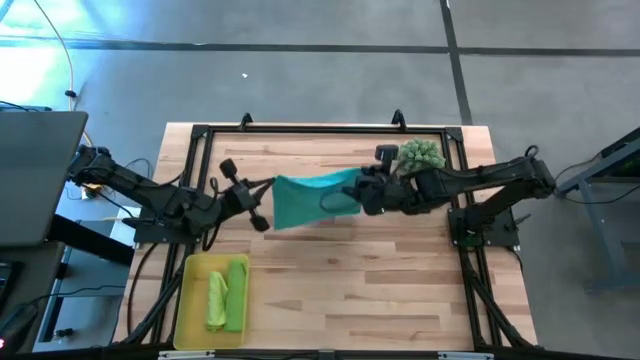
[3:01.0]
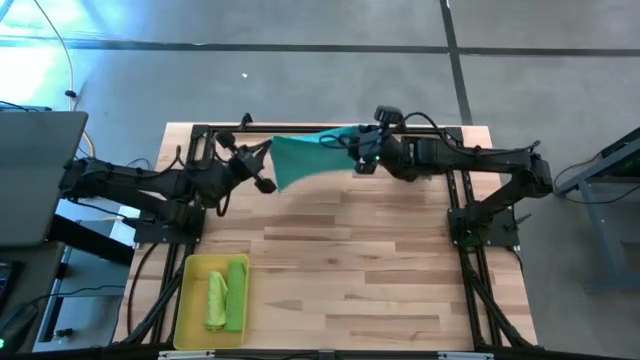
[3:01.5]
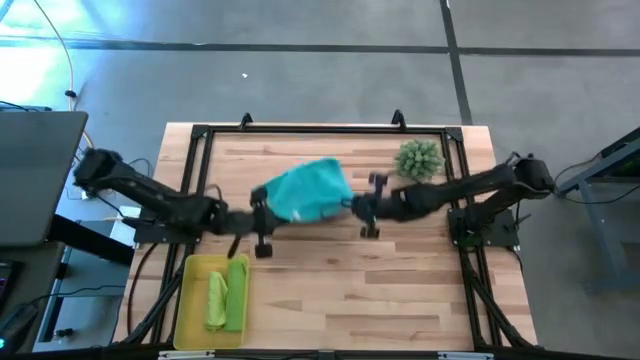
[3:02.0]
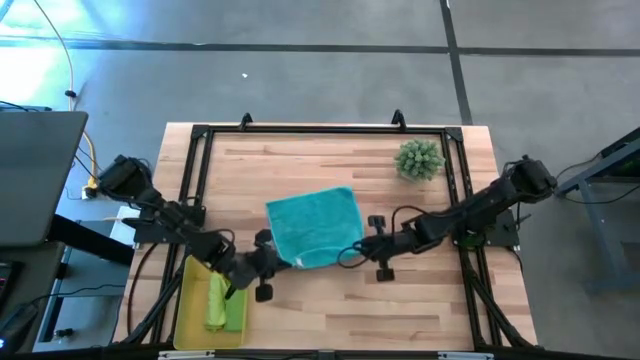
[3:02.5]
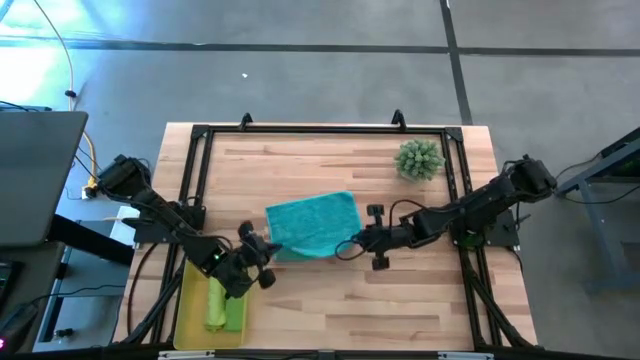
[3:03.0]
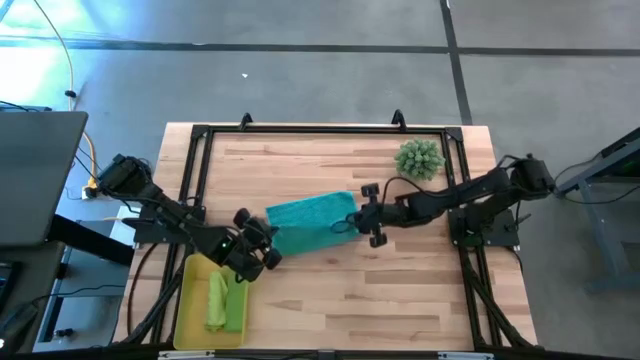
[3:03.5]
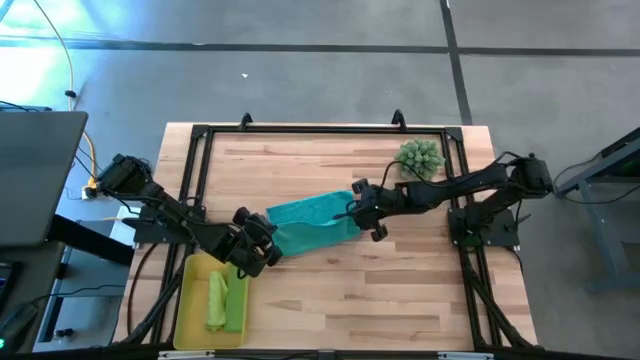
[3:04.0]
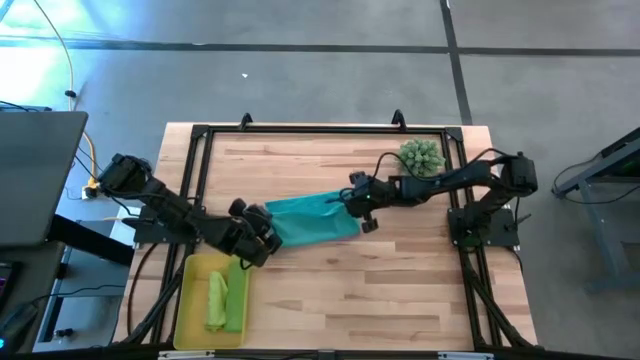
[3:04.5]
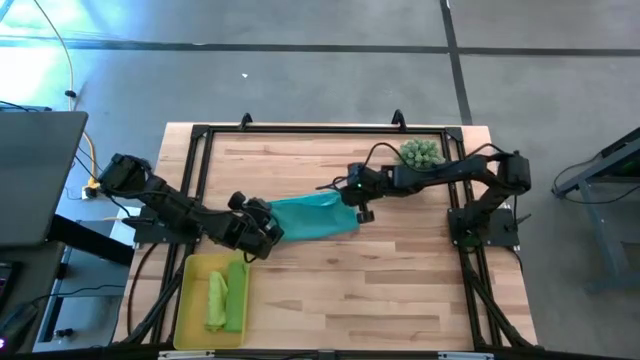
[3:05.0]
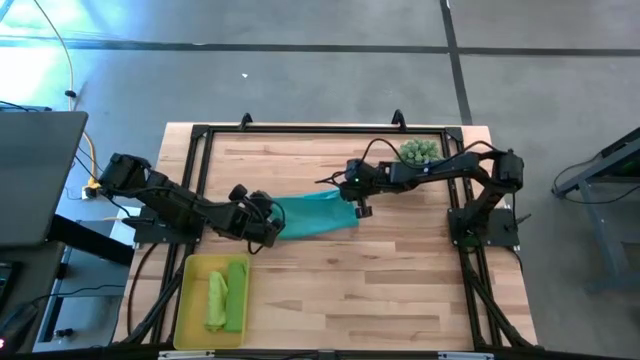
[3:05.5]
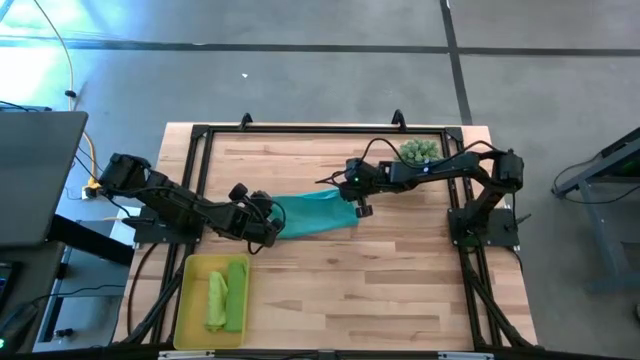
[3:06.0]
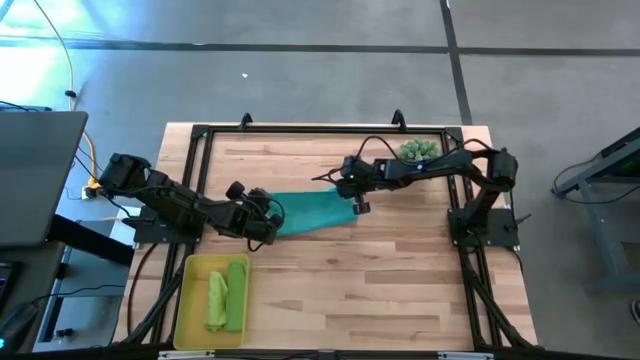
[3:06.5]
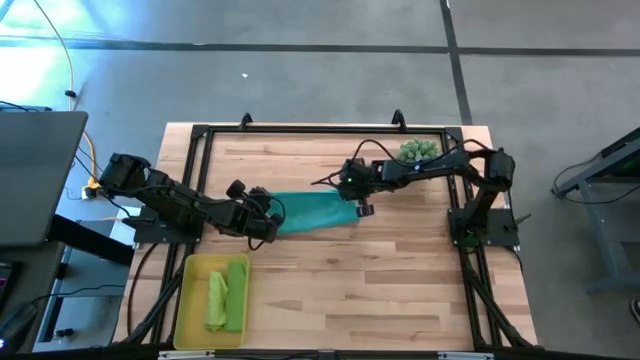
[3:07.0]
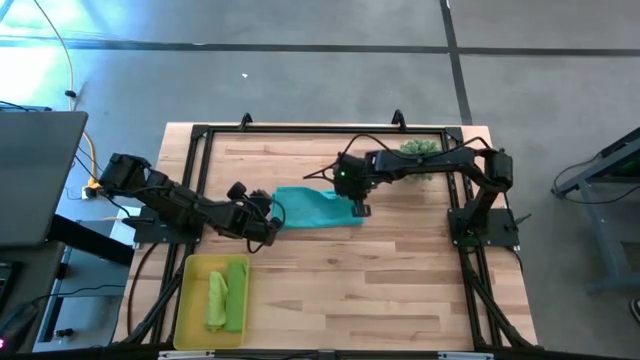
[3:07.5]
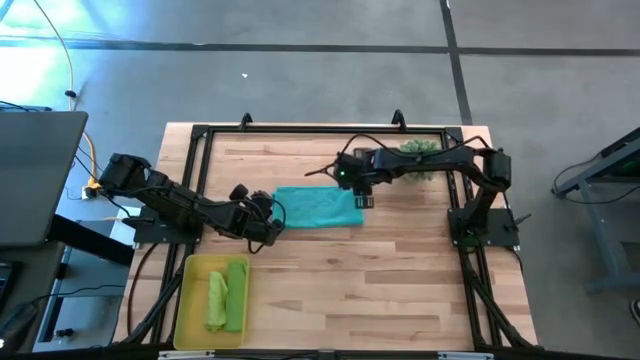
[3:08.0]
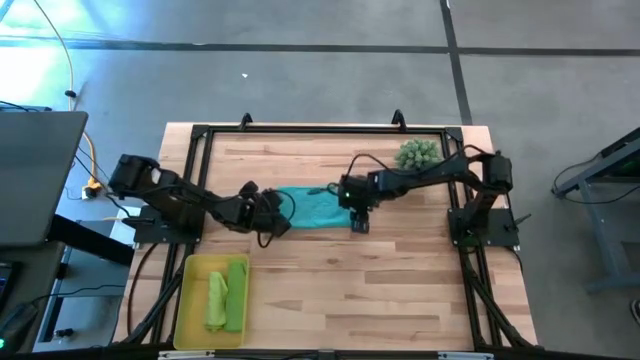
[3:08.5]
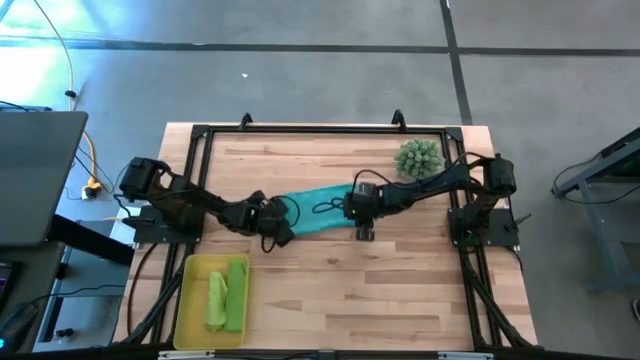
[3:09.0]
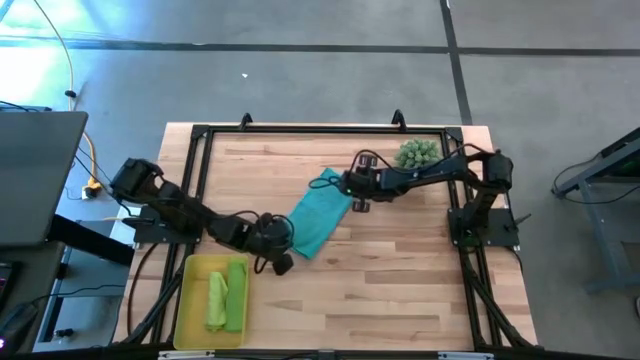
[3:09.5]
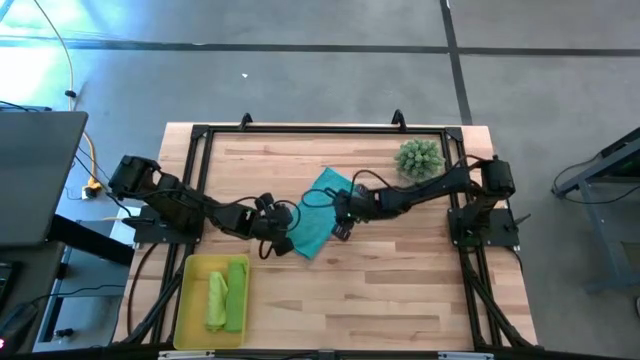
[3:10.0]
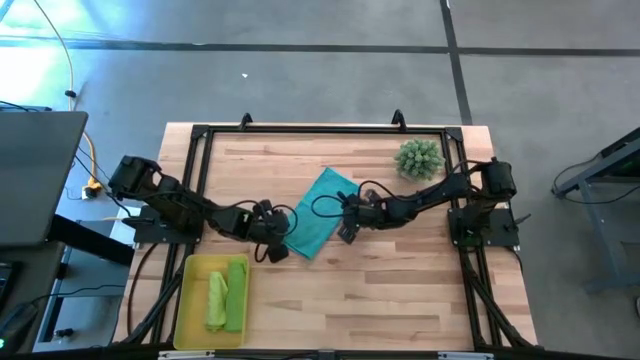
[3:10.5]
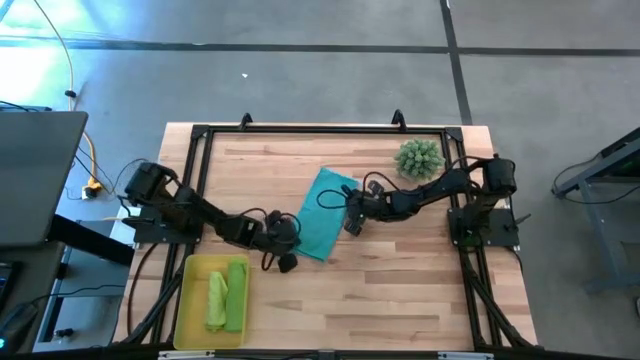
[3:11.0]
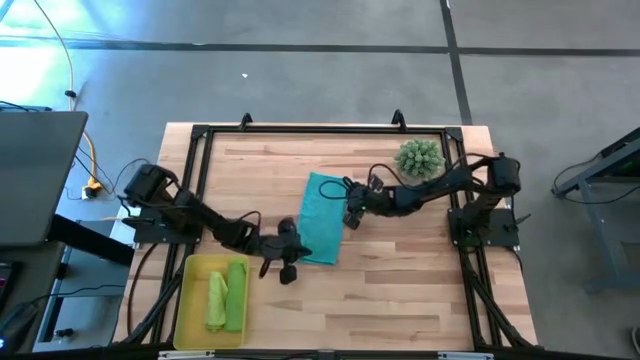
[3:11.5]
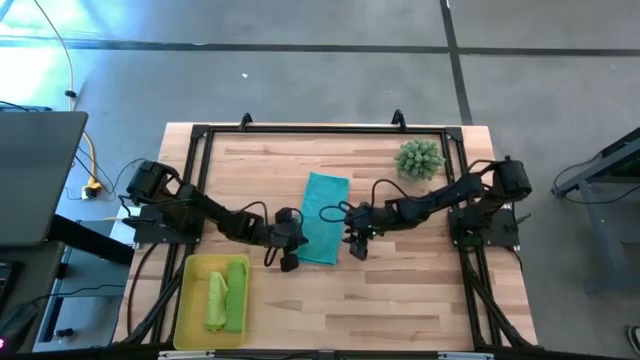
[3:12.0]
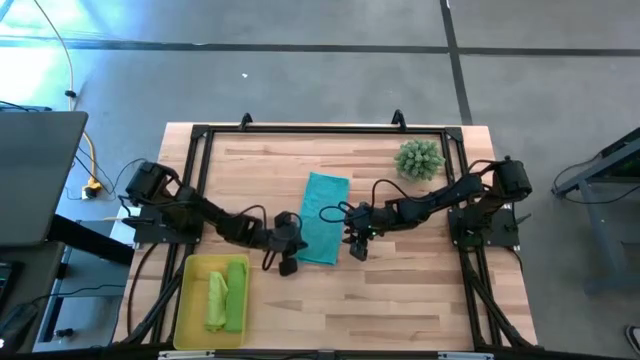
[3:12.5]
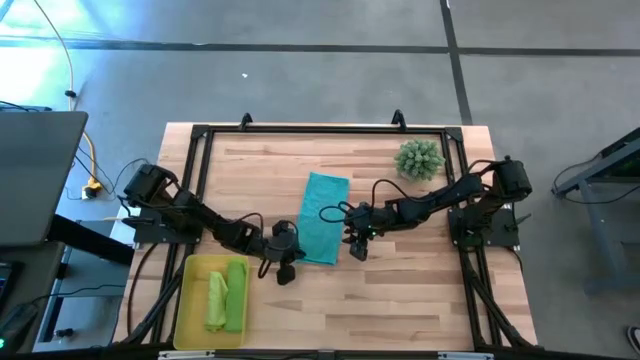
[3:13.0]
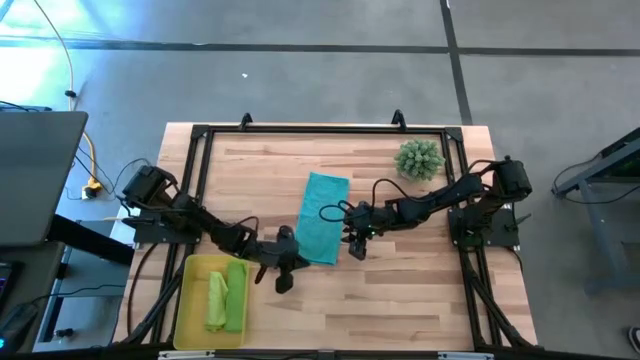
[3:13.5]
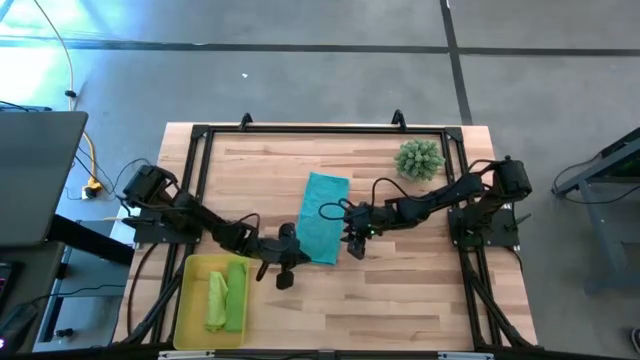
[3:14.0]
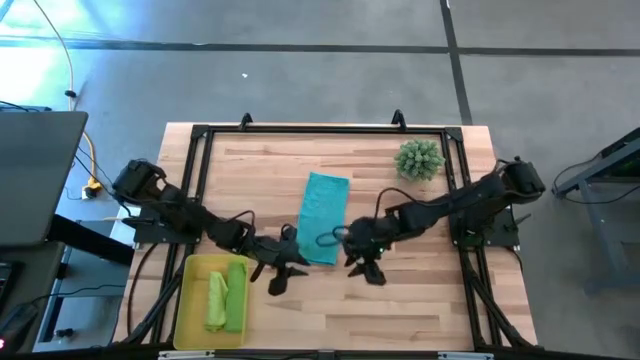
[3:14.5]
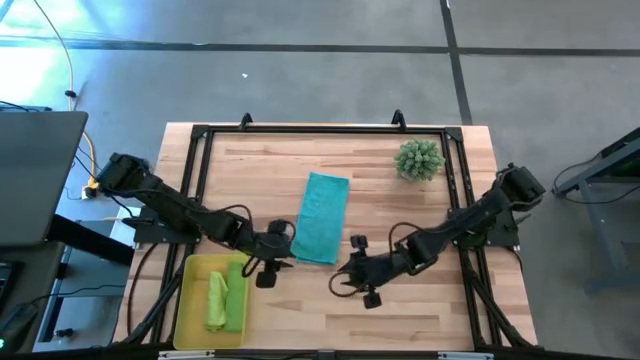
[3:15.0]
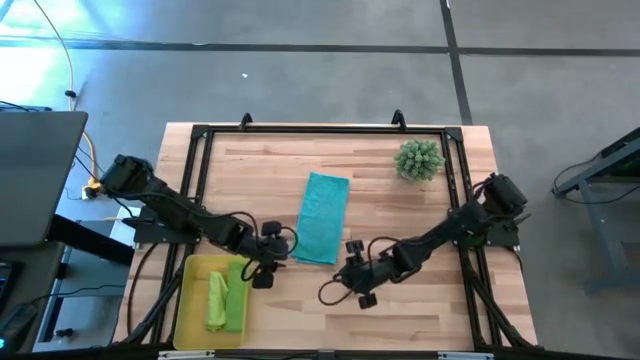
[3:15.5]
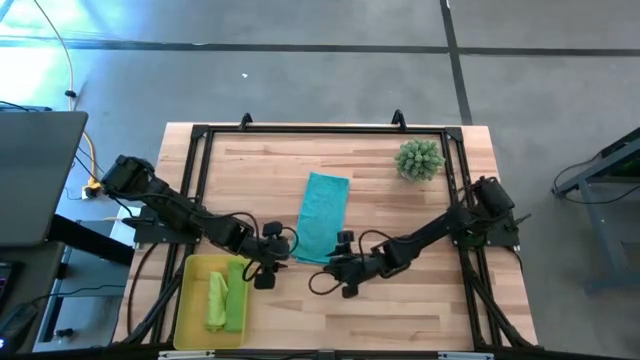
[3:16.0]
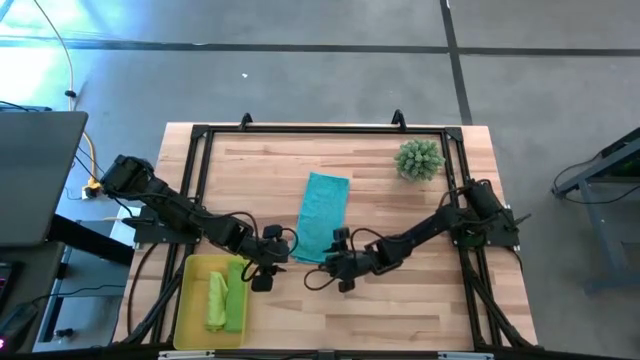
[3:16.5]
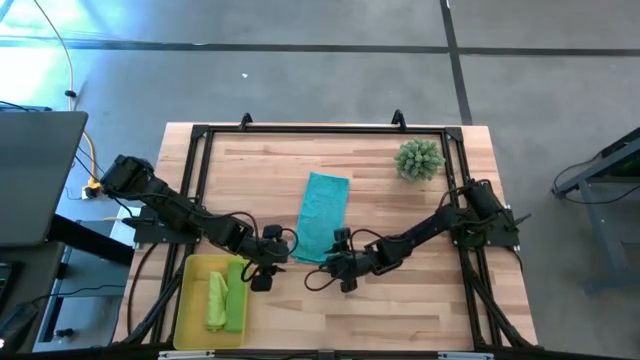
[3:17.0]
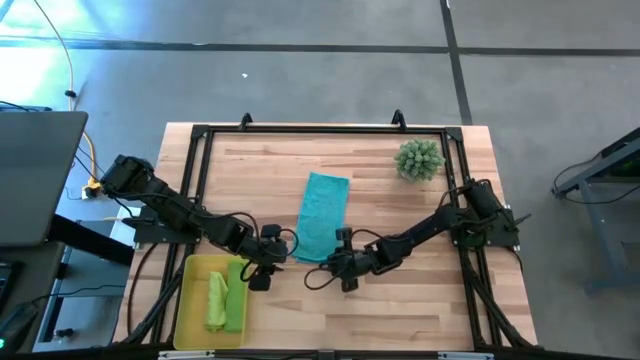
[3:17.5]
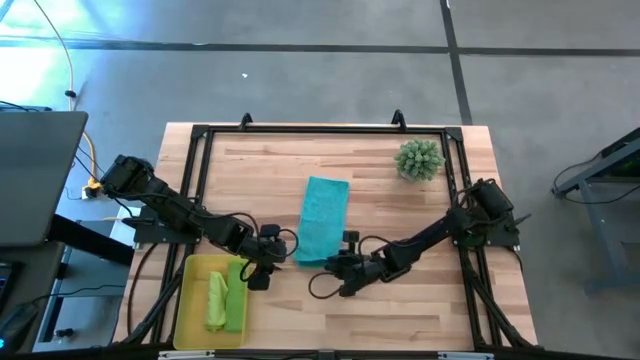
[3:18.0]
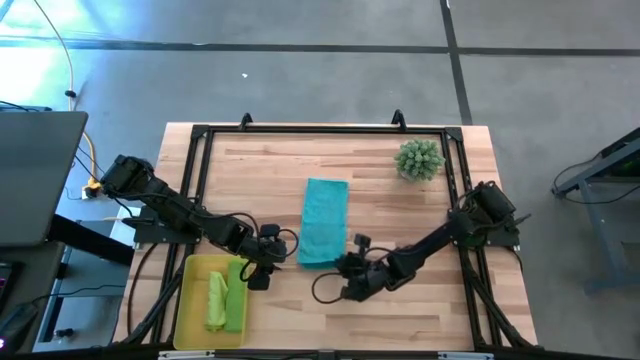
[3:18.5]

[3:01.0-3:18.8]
Task: Roll microfiber towels into tight, uniform cylinder then place into a basket
Fold the blue microfiber towel

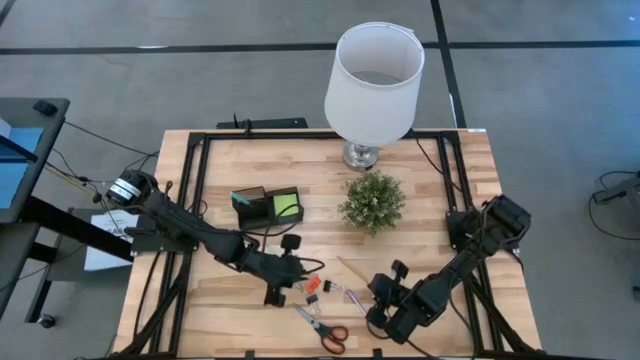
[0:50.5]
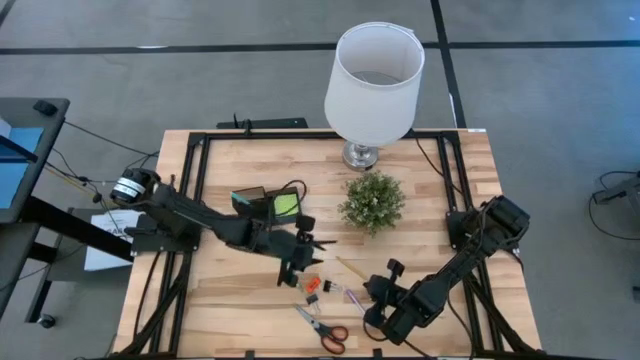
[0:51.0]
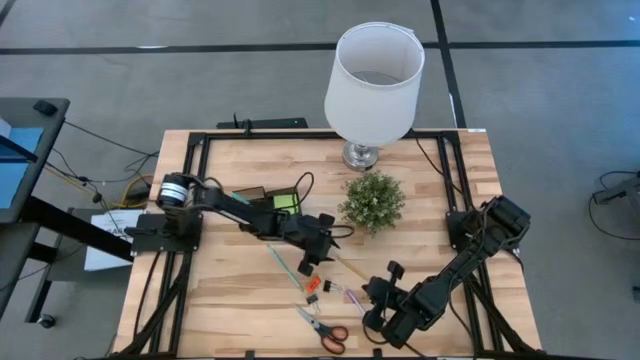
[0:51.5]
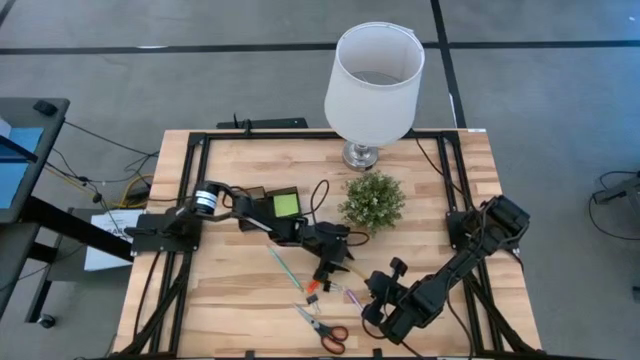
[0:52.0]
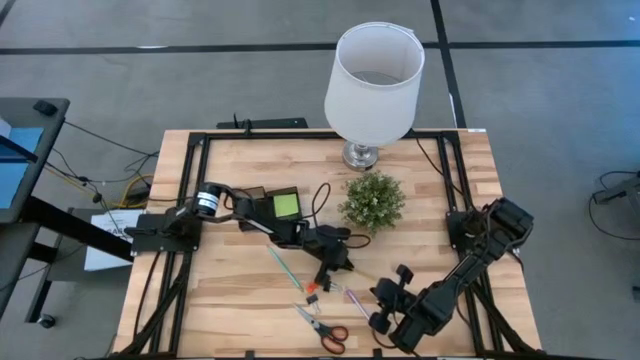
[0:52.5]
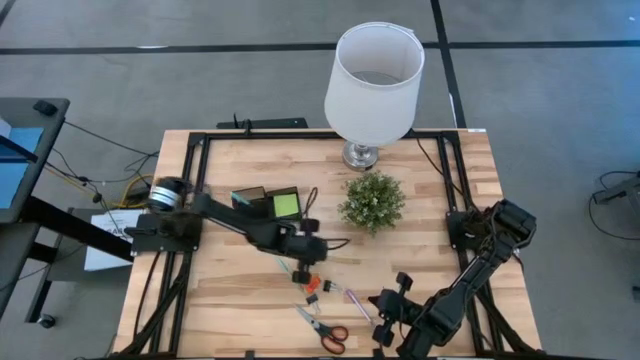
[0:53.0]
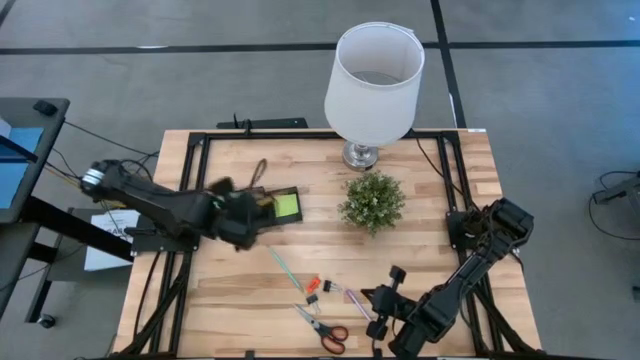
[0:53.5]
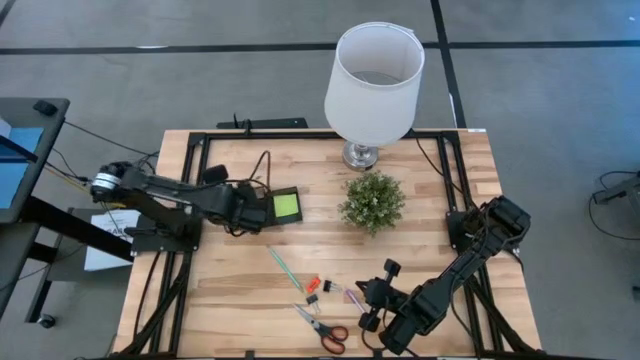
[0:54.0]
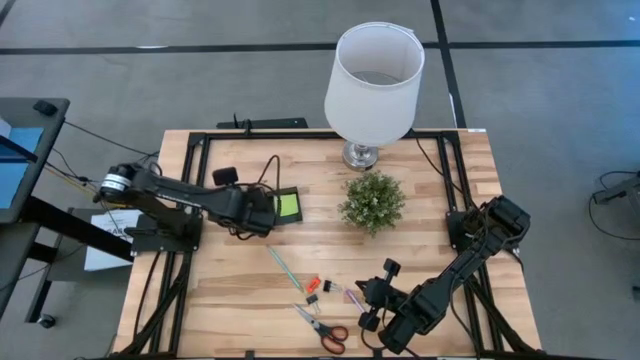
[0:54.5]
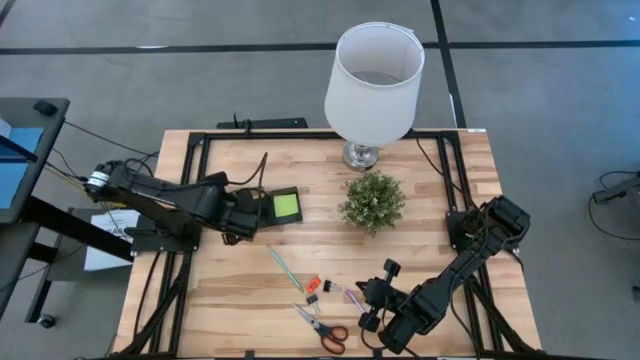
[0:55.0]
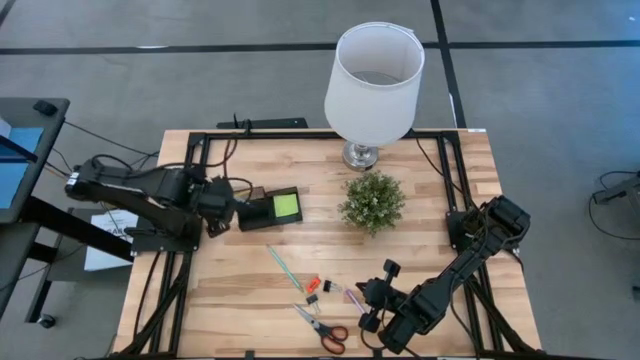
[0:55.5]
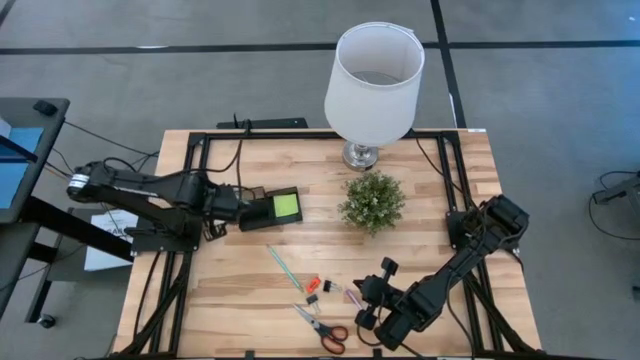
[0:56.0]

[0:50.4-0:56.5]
Task: Pick and place office supplies into organizer
Put the yellow pencil into the black desk organizer
